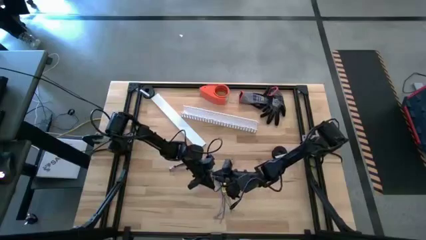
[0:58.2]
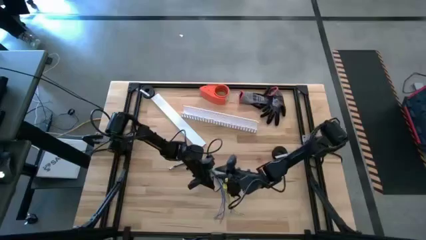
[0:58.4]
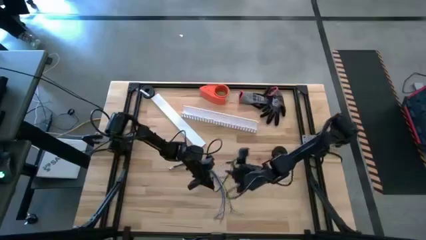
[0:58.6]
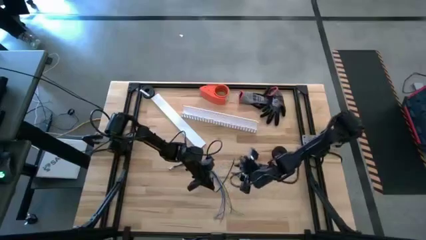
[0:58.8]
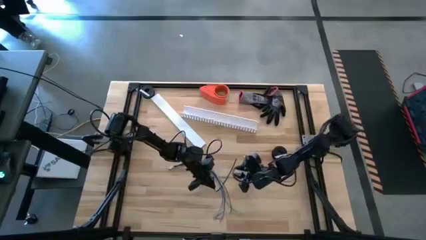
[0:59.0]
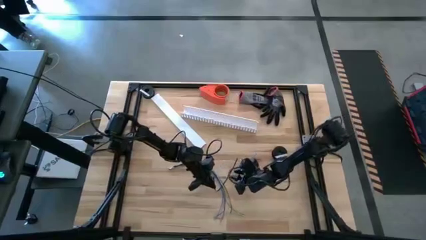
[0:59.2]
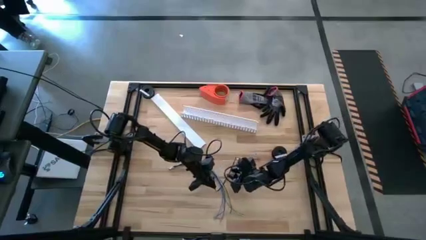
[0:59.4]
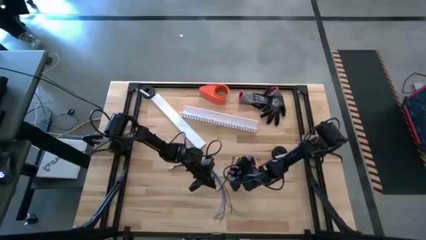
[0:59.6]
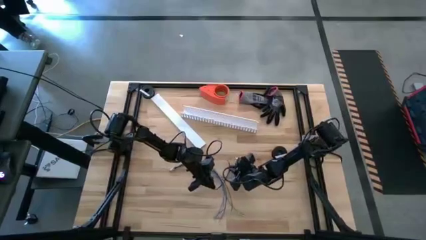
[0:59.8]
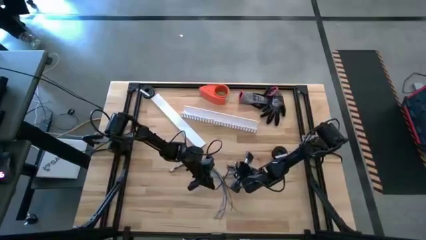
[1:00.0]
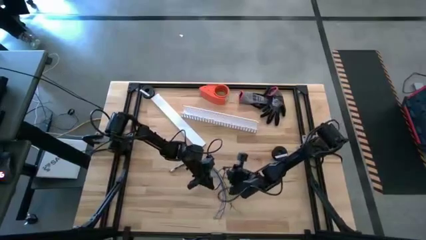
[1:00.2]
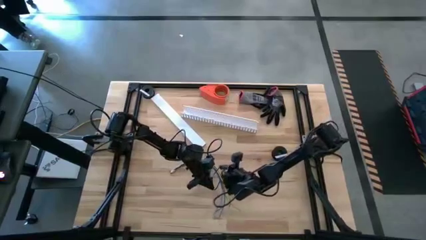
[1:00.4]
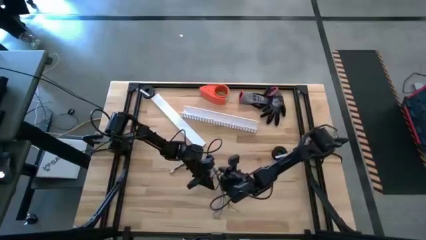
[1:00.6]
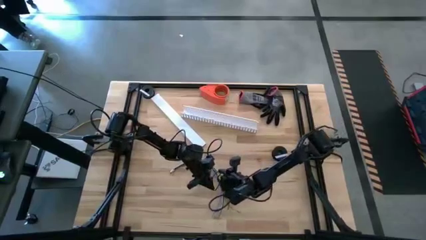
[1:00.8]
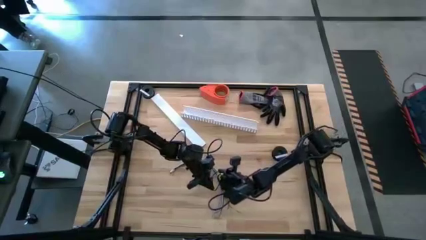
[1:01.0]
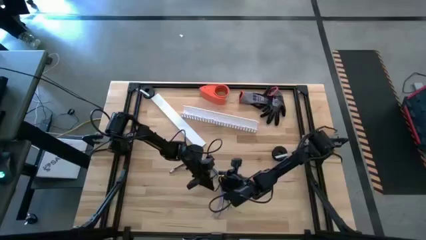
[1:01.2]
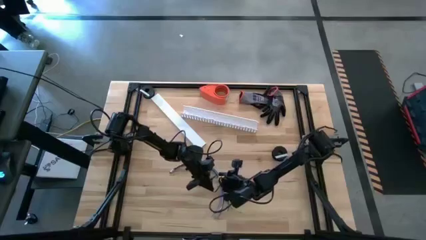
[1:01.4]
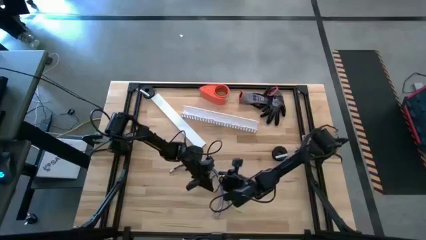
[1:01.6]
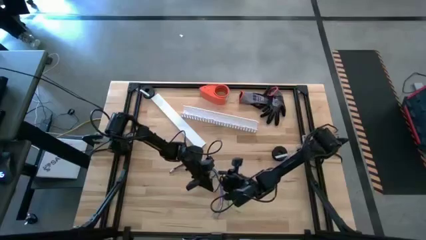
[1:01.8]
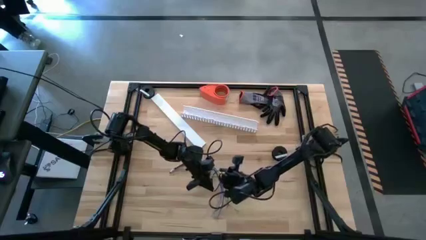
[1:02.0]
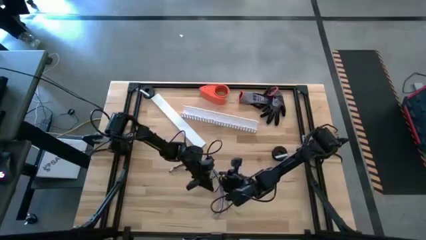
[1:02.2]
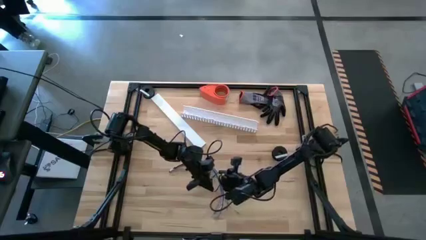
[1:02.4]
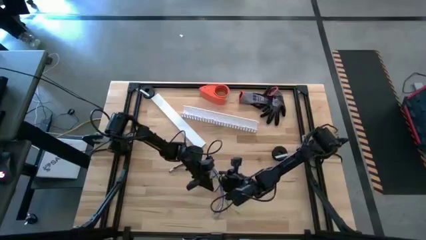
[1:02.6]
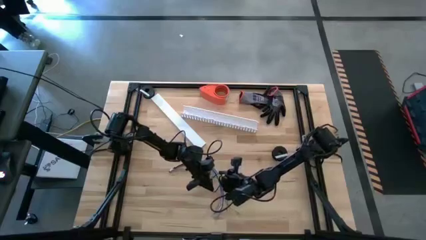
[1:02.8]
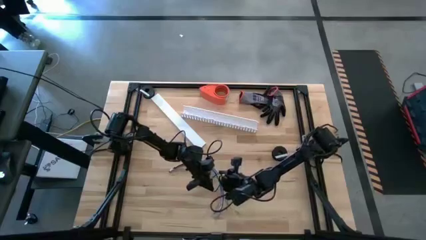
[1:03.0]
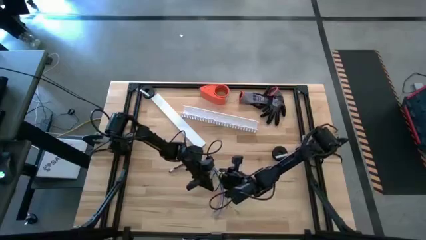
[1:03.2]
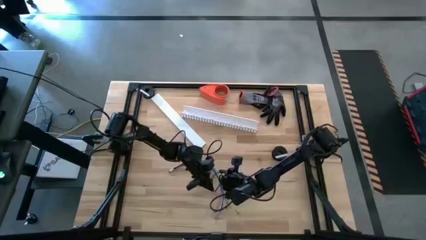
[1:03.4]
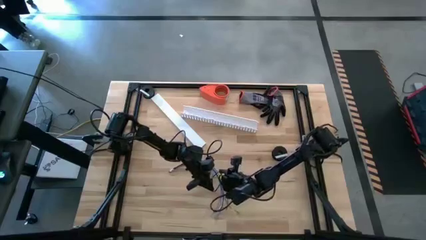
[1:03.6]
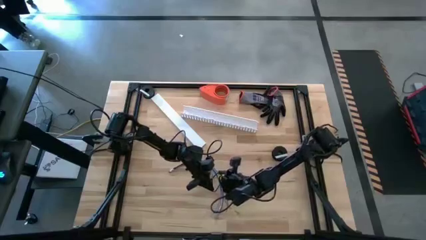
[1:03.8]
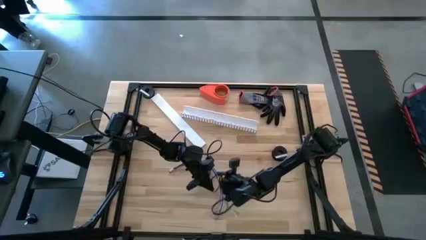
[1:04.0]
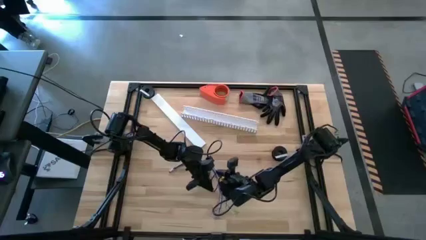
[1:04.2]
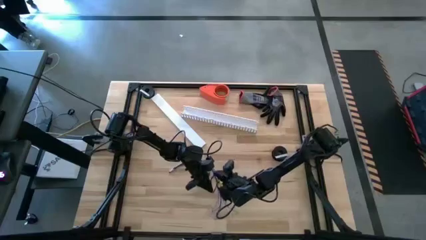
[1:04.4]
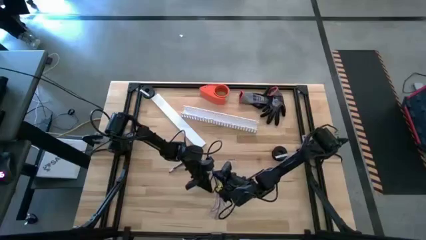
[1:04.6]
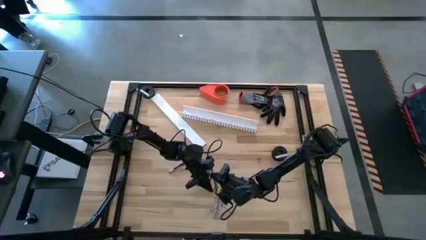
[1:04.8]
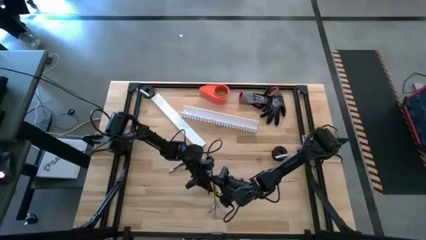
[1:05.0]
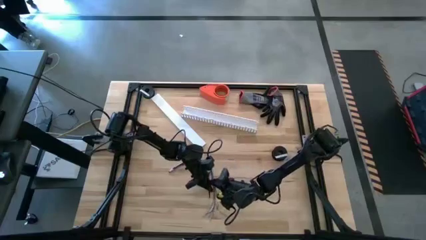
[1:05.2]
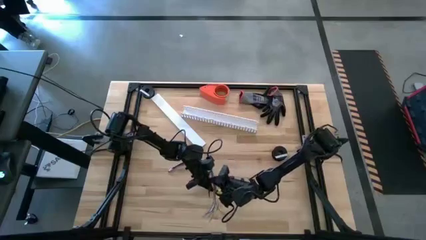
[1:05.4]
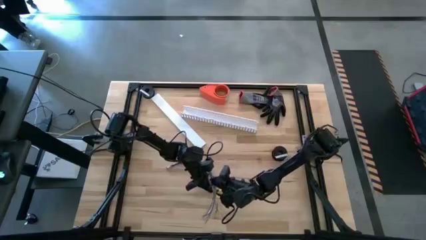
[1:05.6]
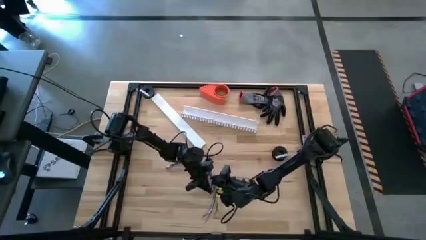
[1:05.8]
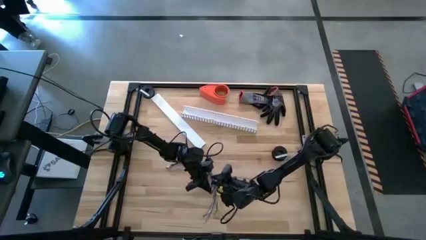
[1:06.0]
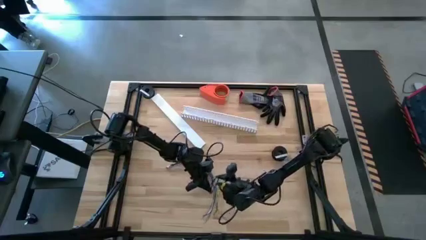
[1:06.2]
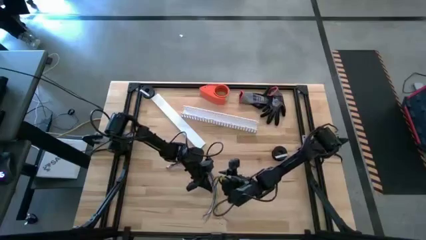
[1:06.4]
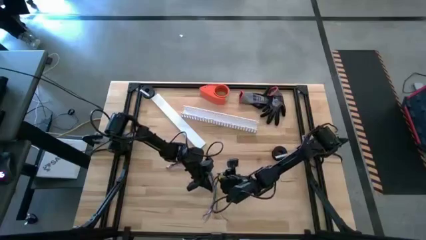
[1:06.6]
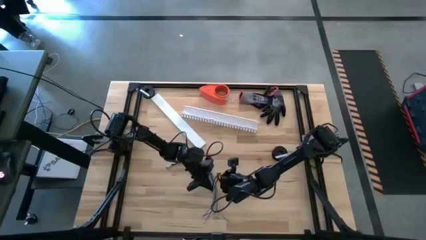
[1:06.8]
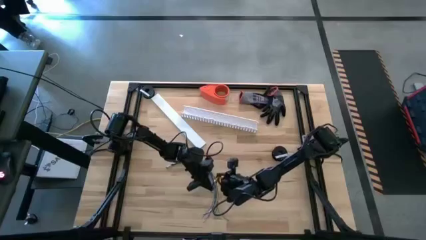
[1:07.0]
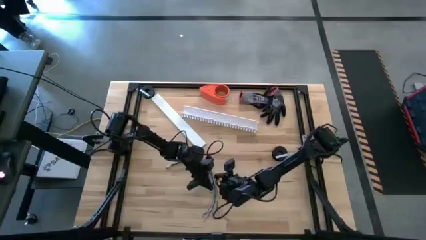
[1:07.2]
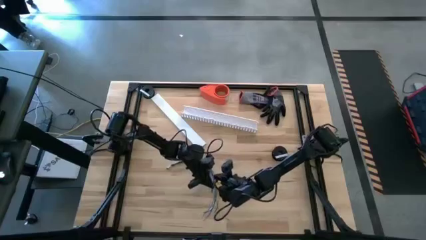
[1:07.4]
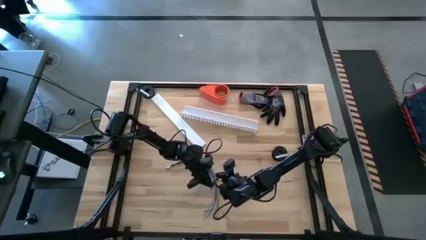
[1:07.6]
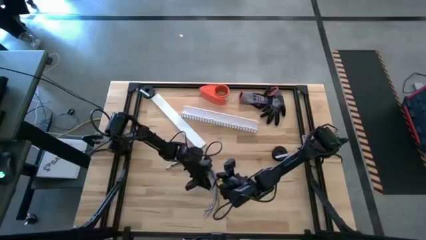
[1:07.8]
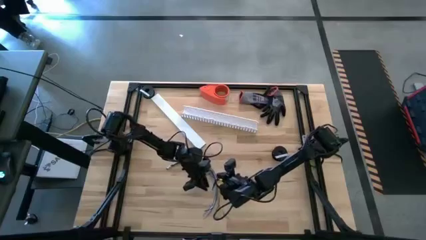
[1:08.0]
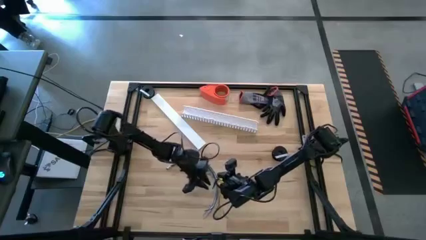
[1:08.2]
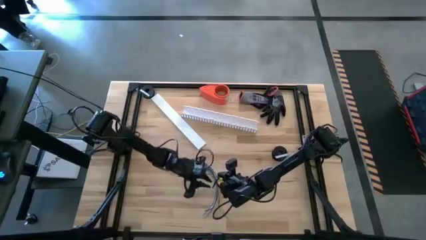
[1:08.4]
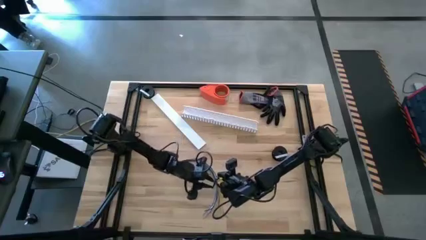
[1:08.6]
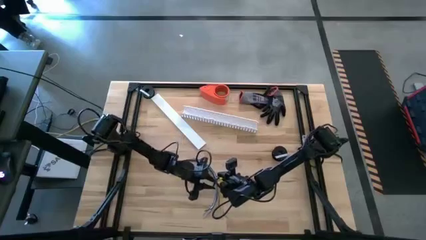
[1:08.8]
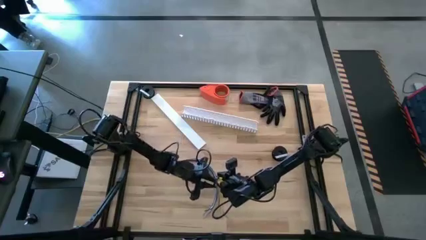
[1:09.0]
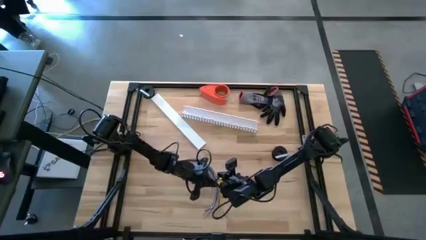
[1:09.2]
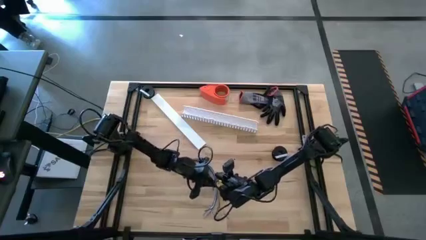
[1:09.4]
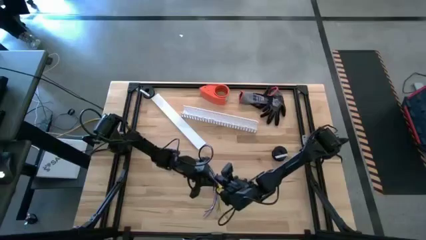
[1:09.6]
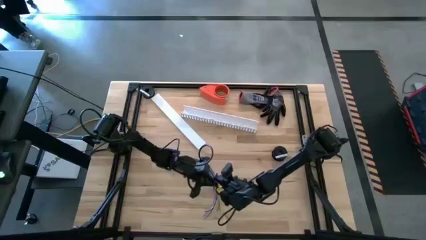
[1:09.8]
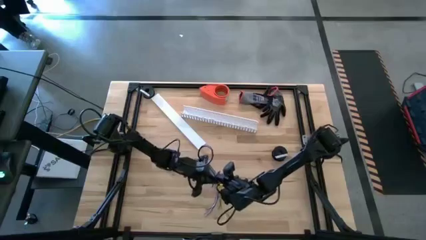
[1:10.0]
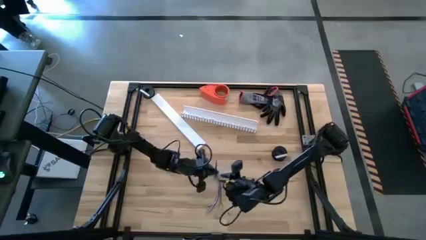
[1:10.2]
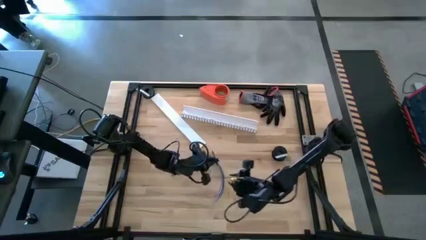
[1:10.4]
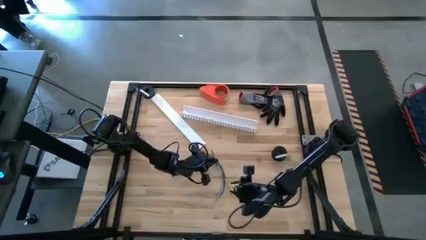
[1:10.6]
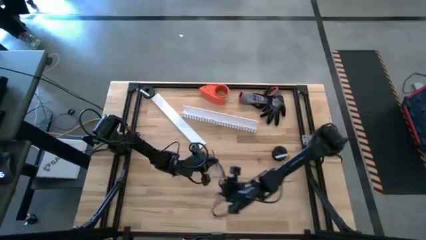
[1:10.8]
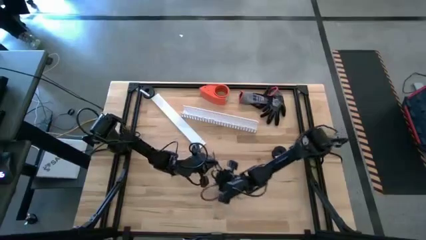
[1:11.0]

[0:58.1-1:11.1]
Task: Ziptie cables
Wrap the cable wires with the black zip tie
